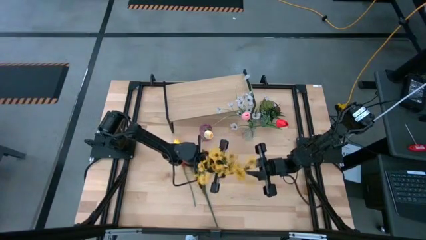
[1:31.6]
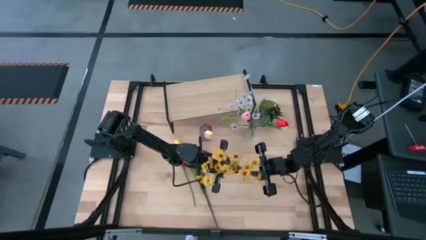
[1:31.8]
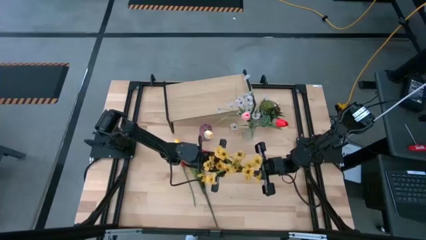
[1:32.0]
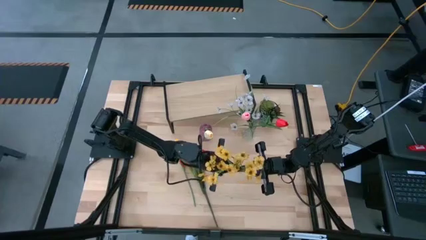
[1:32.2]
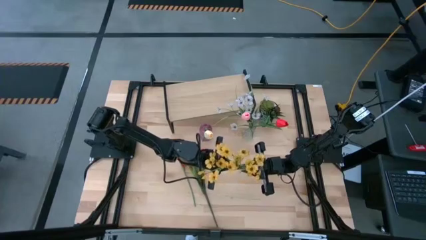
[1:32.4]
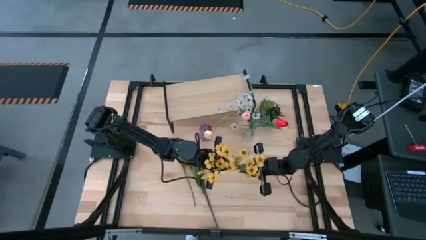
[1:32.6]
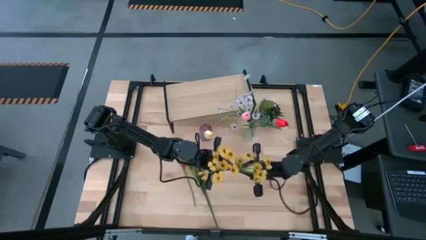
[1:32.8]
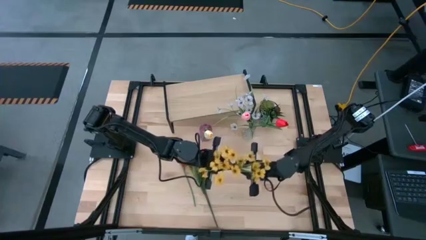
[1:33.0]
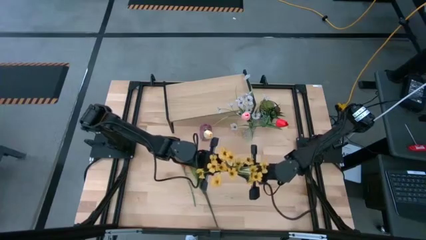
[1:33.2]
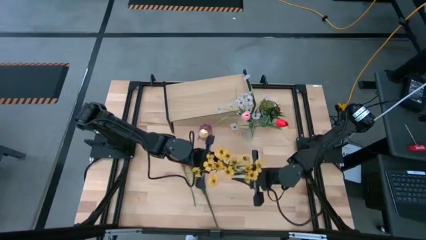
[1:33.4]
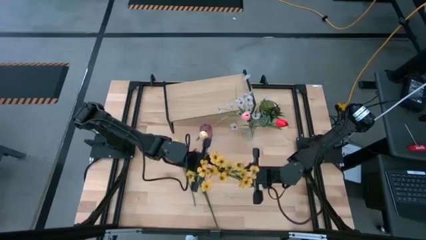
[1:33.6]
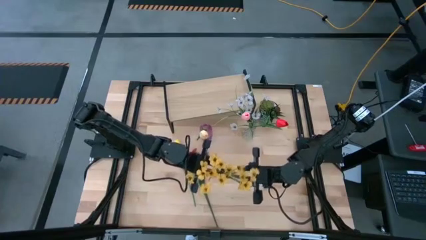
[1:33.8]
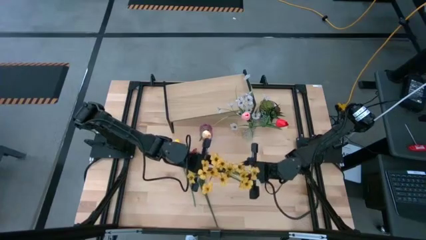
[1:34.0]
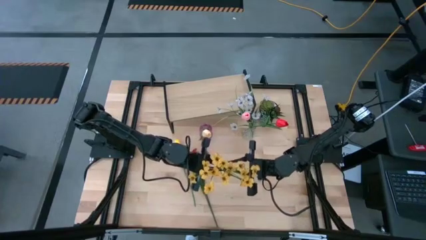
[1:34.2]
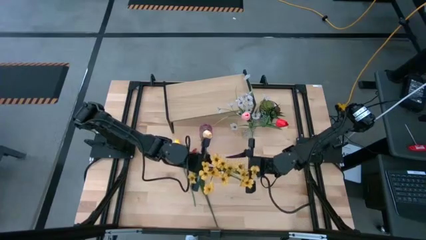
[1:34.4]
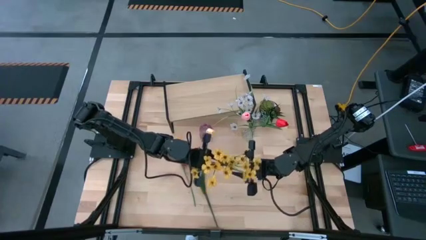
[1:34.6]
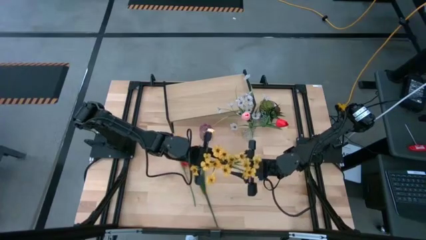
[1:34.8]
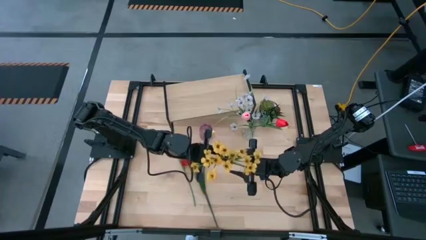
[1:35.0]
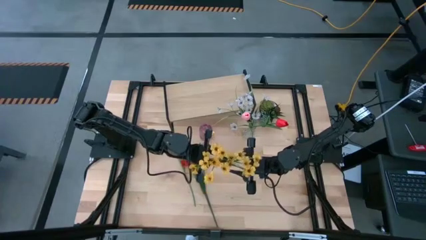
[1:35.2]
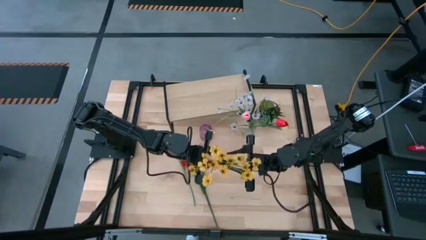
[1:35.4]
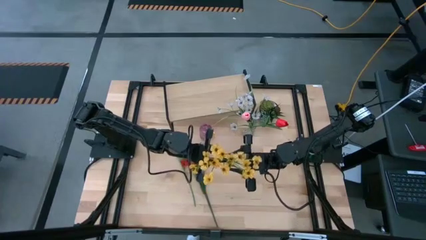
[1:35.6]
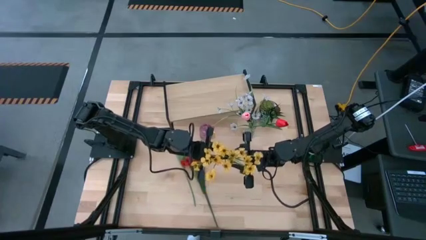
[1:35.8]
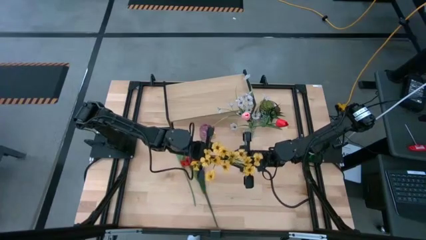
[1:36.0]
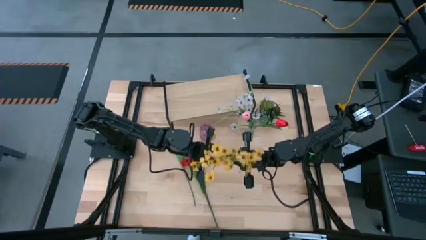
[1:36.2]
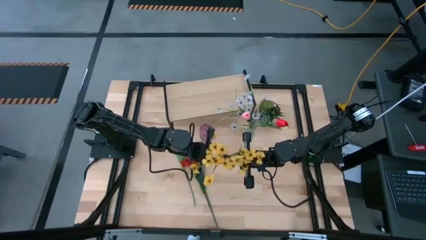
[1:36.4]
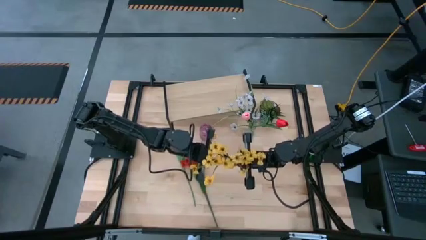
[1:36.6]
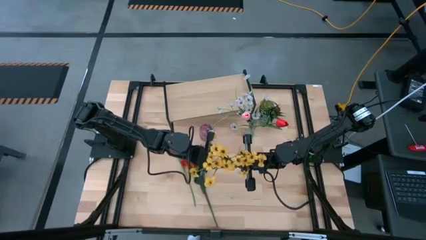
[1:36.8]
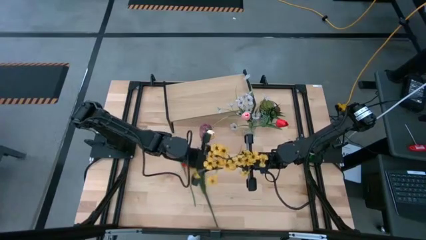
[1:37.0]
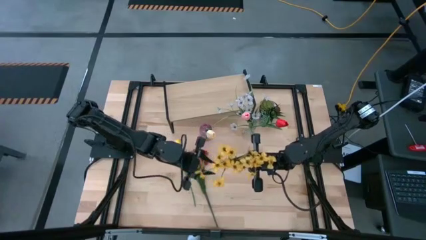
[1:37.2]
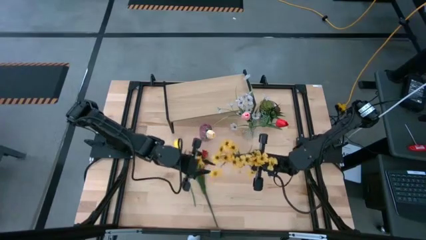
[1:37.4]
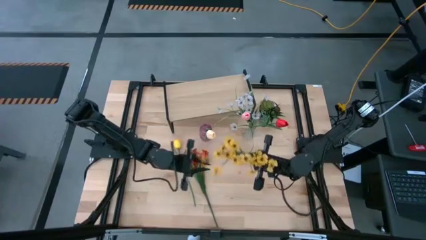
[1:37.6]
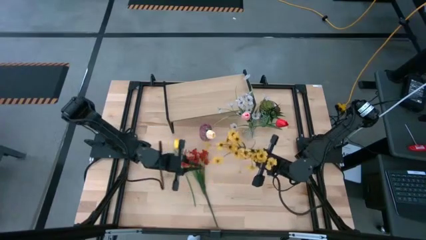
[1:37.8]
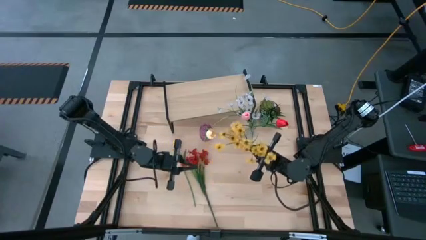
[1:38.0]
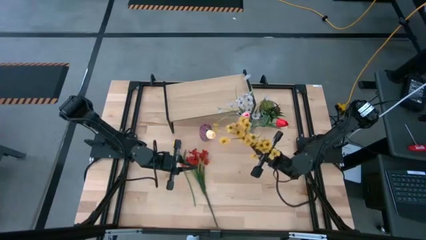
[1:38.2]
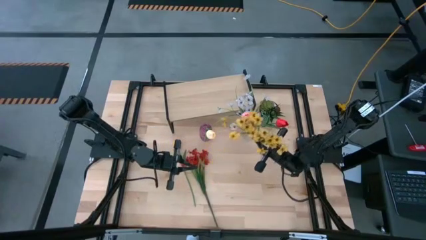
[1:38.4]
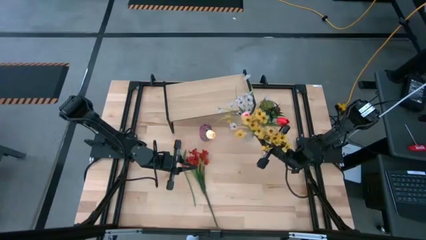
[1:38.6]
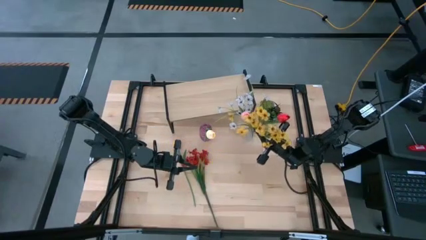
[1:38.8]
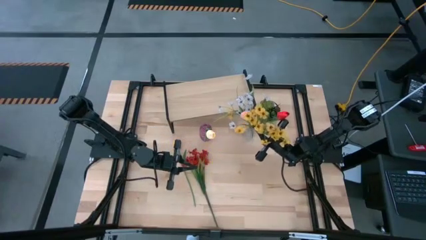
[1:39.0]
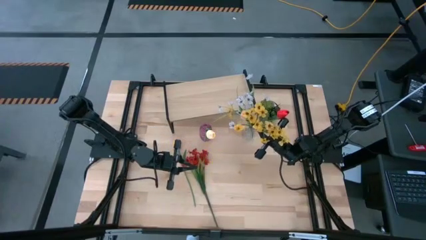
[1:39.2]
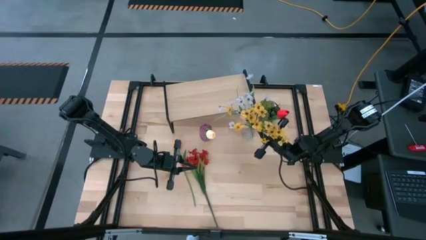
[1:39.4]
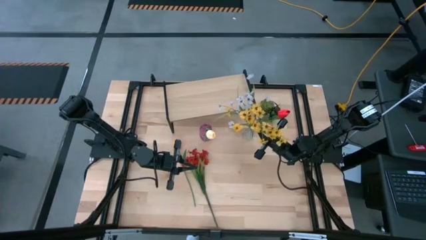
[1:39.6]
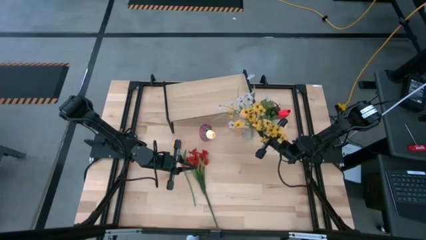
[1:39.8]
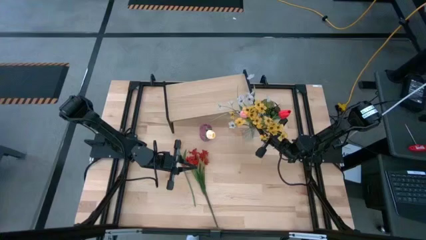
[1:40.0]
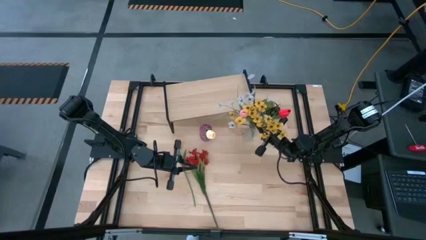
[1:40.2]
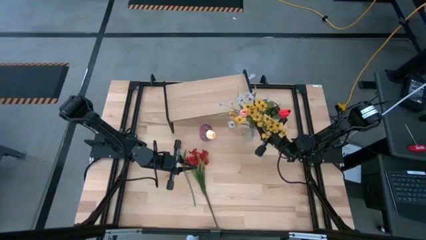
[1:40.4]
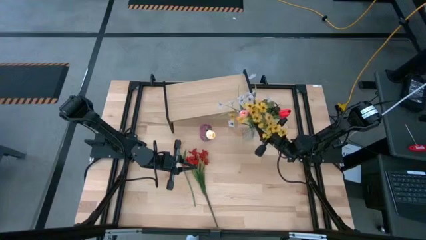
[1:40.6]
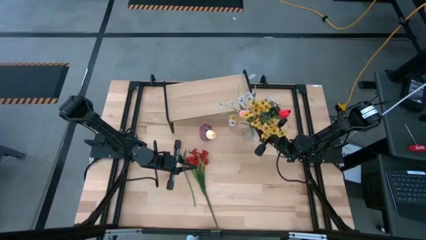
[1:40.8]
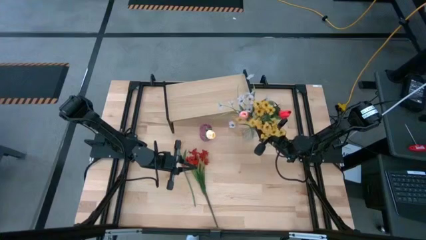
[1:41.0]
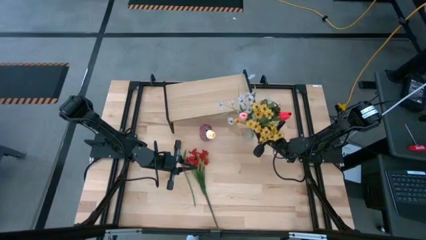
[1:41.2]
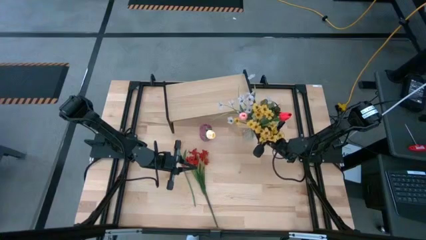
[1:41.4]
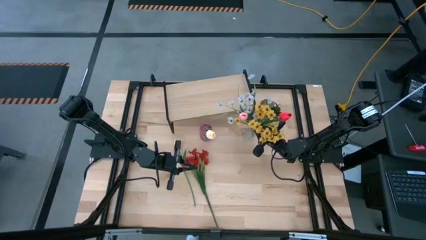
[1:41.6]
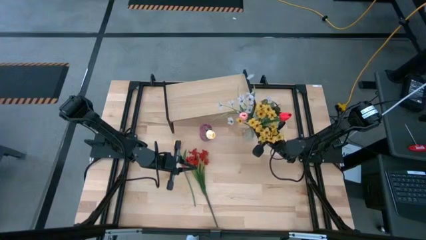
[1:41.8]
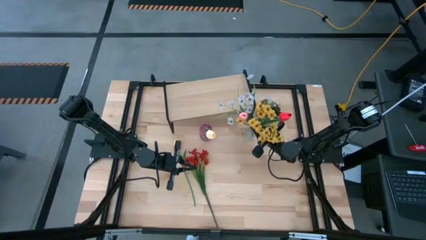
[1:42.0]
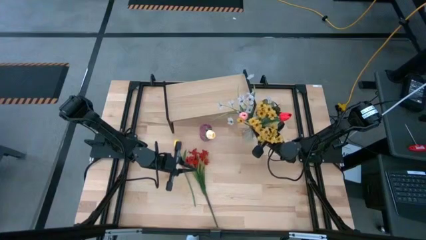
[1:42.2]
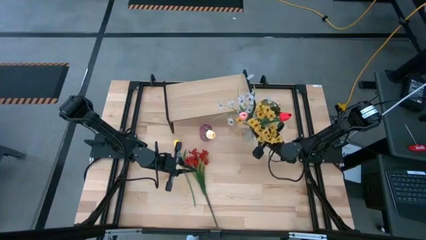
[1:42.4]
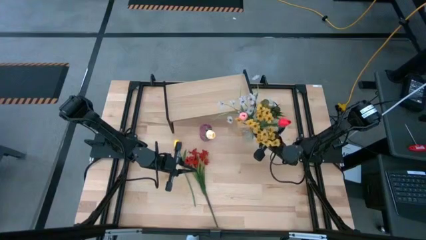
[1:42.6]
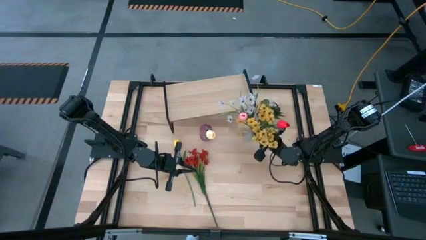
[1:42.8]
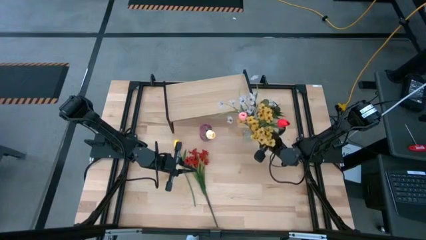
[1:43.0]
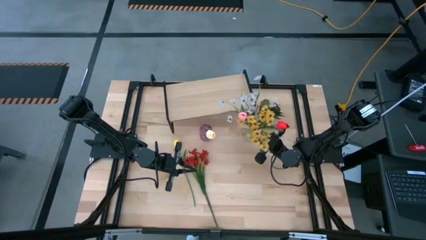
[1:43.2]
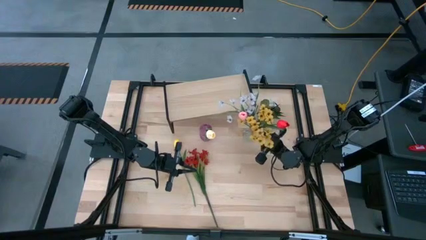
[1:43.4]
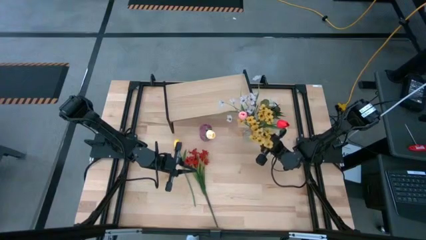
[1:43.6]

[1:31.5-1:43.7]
Task: Pick and place flowers into a vace then onto a shelf
Put the yellow flowers into the transparent vase

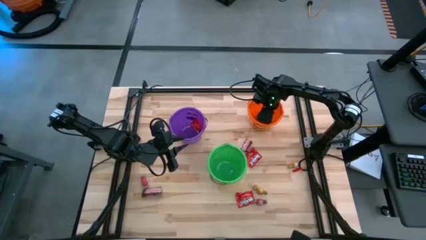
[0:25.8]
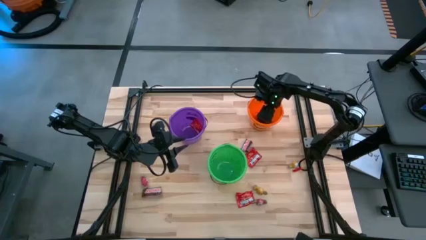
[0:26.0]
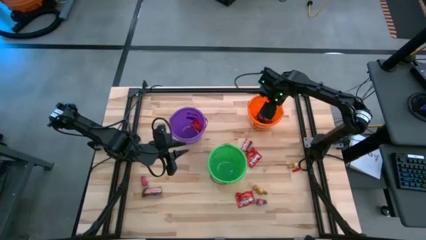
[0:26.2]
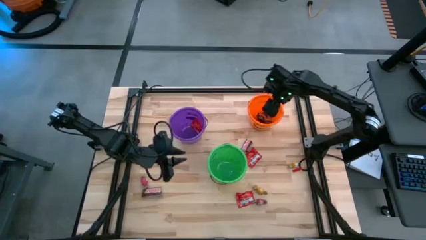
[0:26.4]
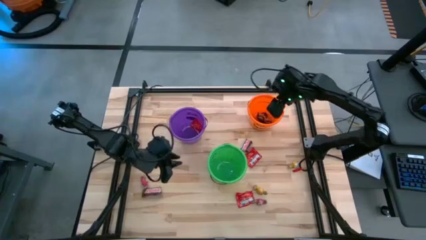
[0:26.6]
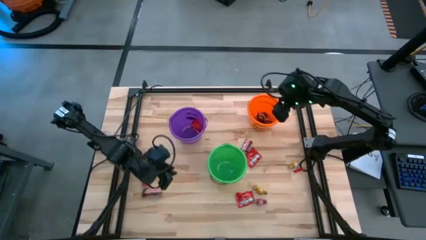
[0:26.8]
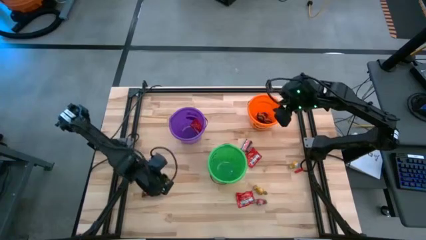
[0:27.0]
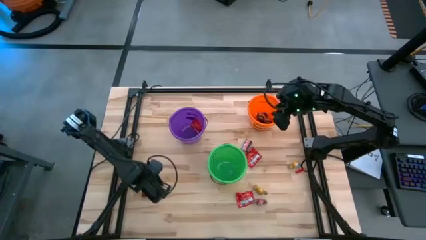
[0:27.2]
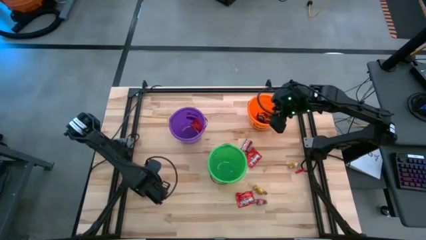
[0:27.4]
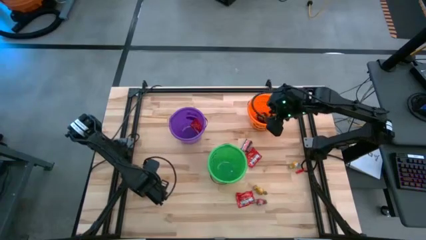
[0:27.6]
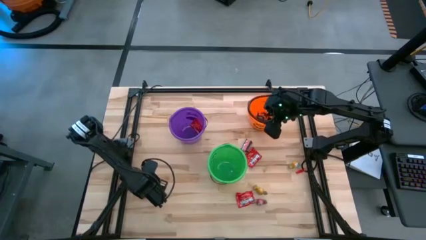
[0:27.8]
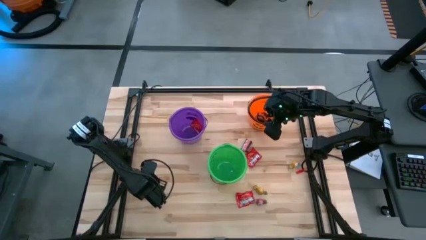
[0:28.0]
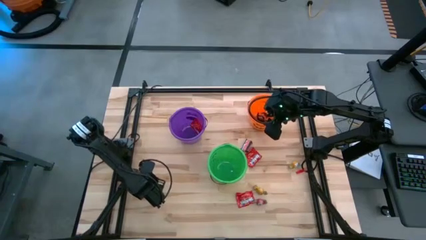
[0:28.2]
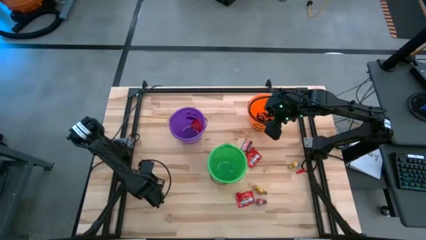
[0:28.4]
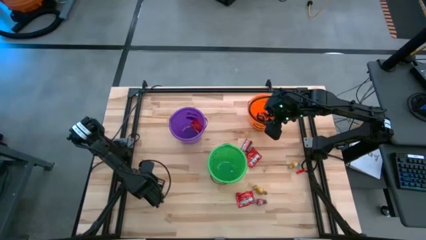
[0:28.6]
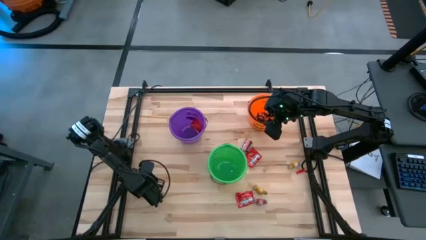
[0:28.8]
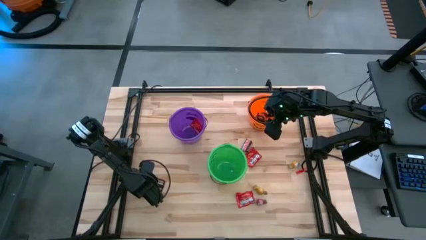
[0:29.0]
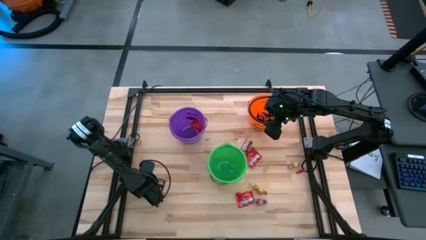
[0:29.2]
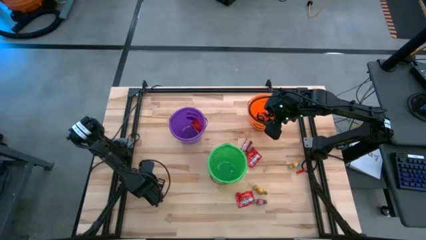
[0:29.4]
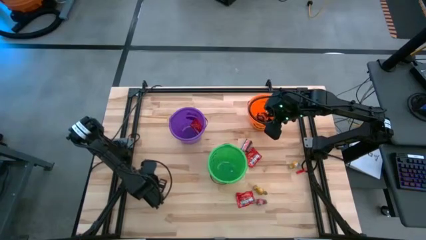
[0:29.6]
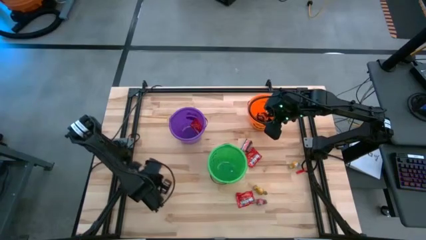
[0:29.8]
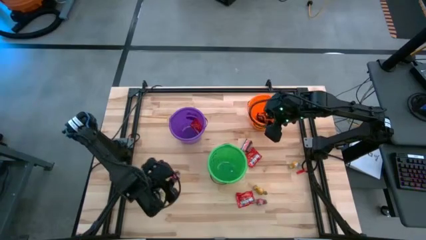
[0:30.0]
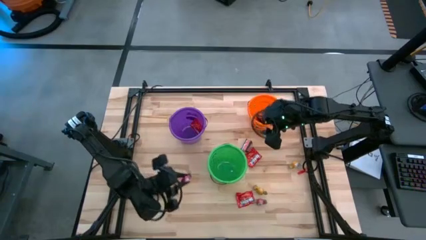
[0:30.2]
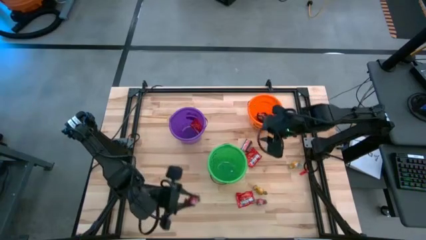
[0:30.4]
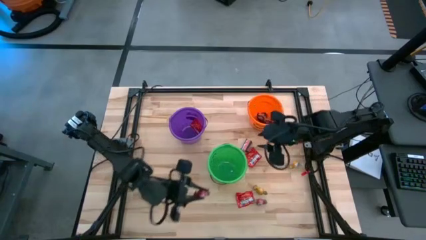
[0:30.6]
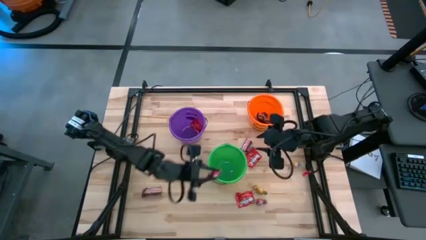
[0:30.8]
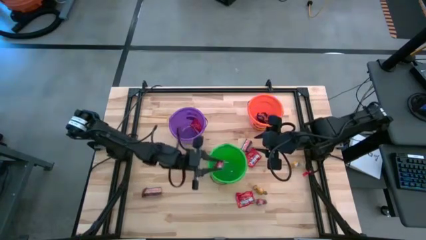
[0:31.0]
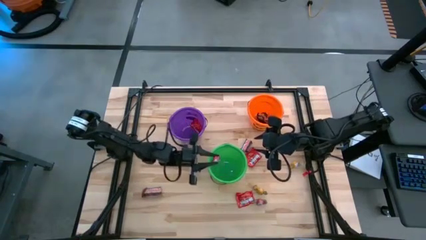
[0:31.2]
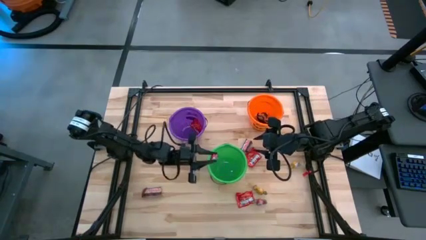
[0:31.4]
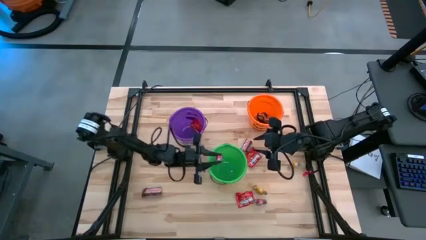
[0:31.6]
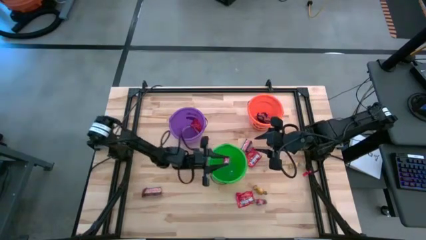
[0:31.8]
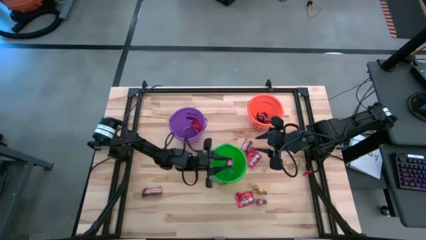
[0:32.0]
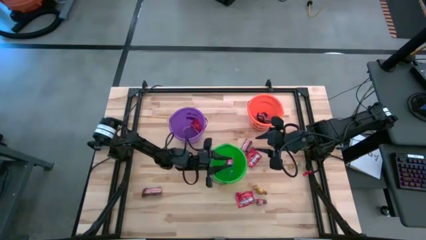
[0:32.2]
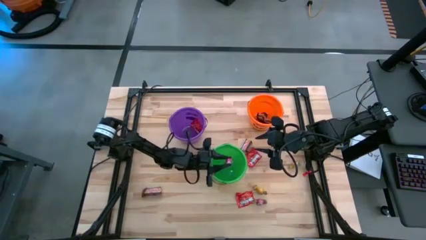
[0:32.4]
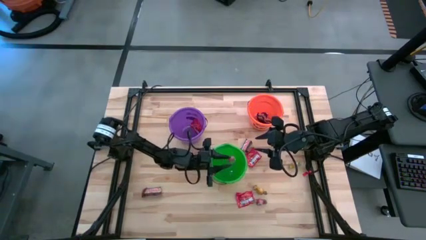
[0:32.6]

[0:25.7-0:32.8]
Task: Organize candy in baskets
Put the pink candy into the green bucket
